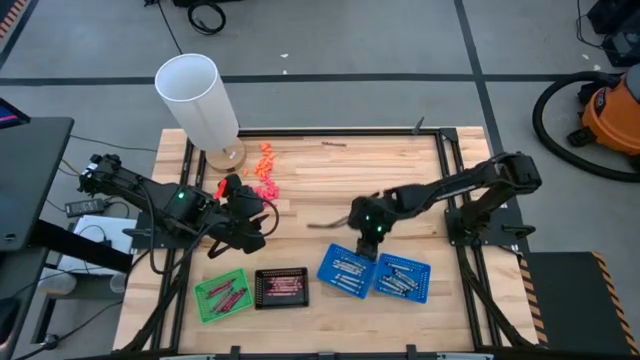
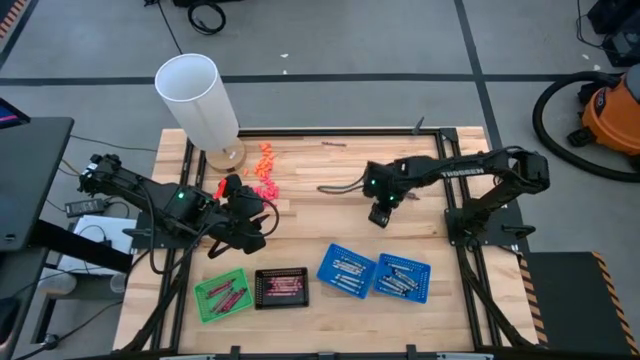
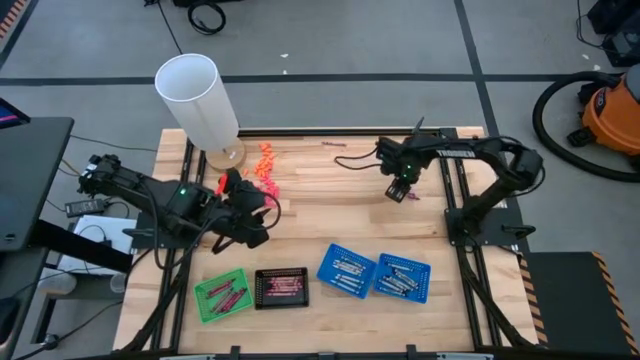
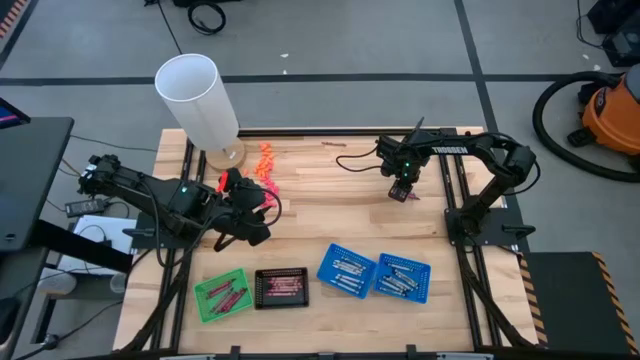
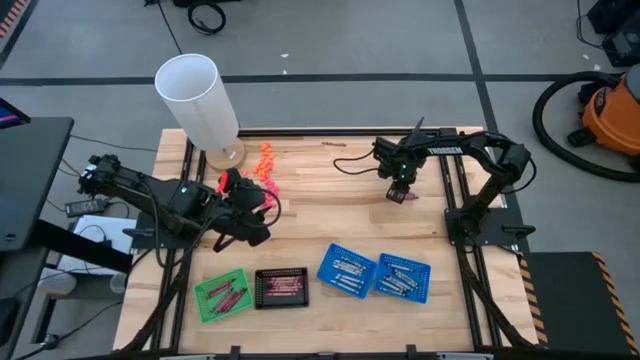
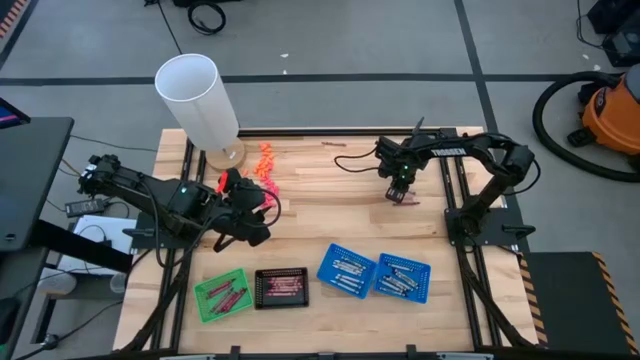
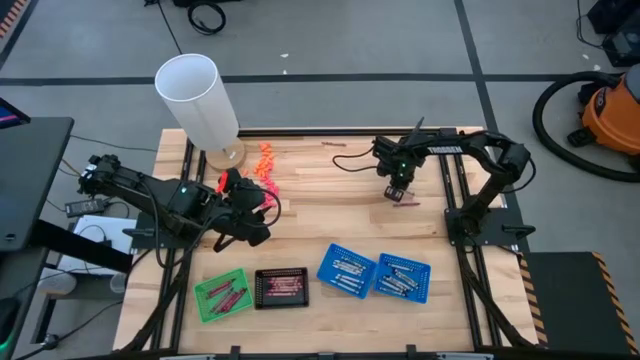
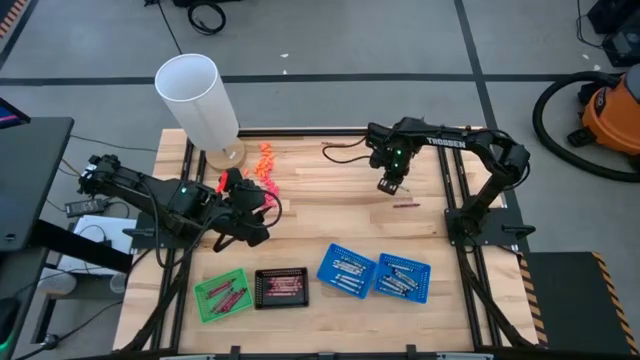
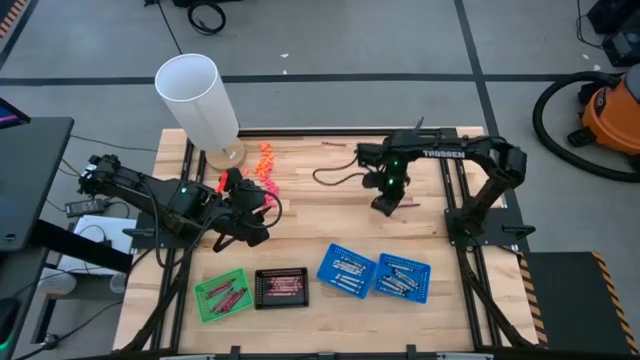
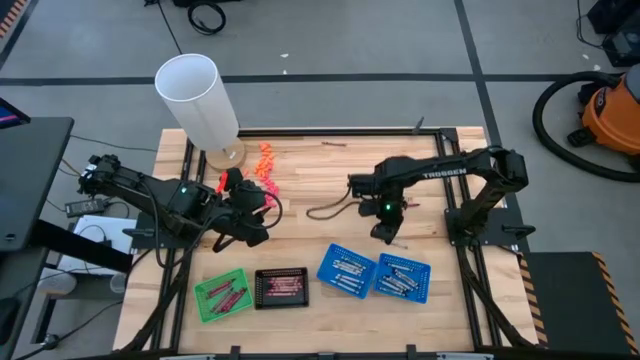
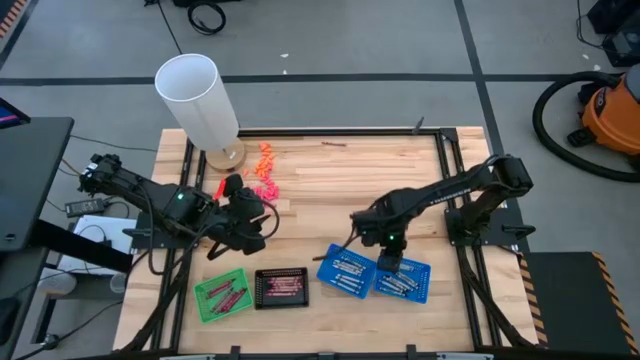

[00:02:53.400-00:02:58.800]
Task: Sort crayons
Put the black crayon into the right blue bin

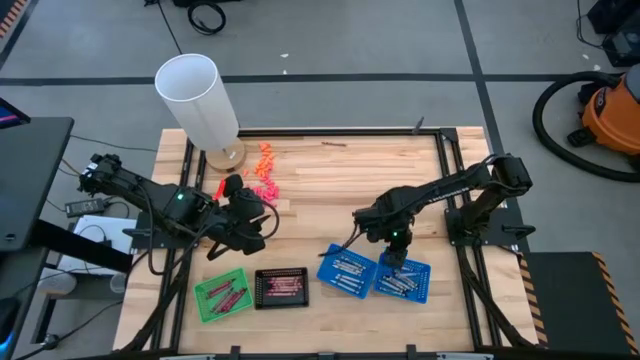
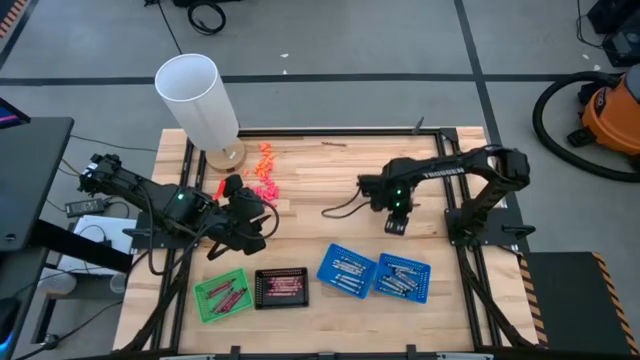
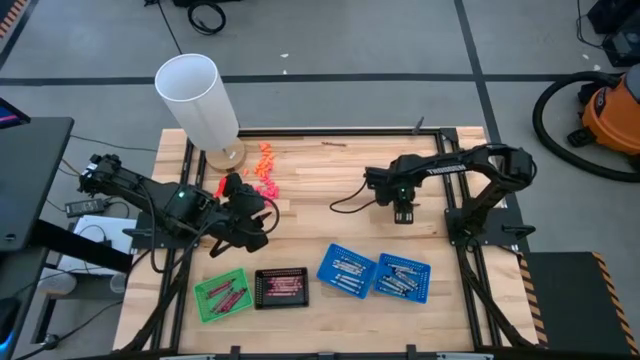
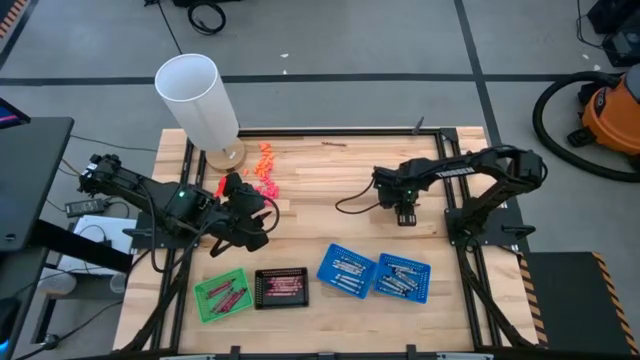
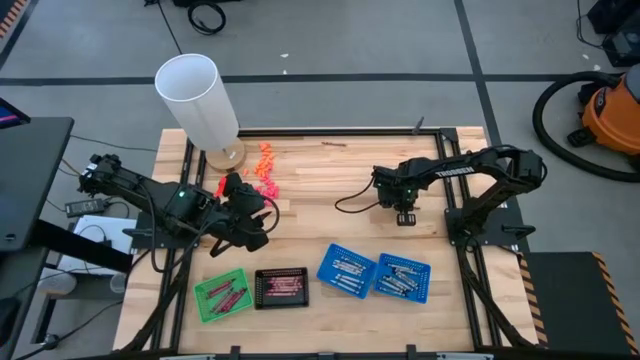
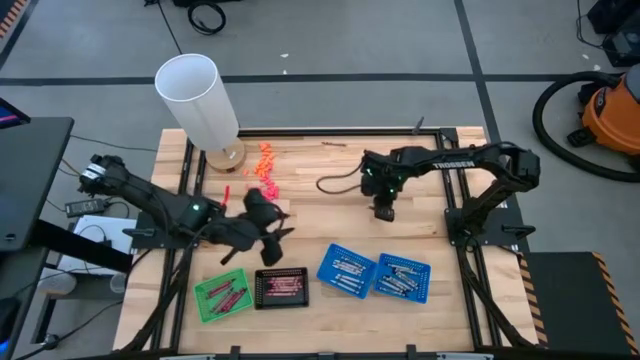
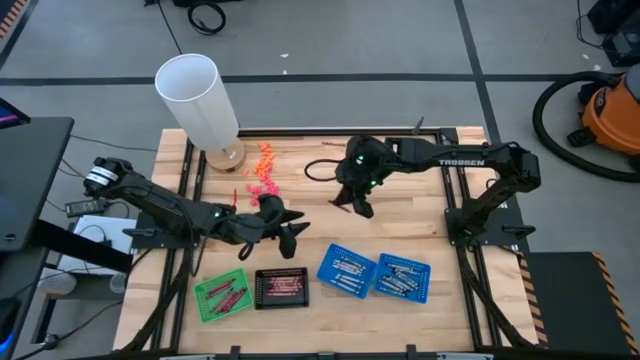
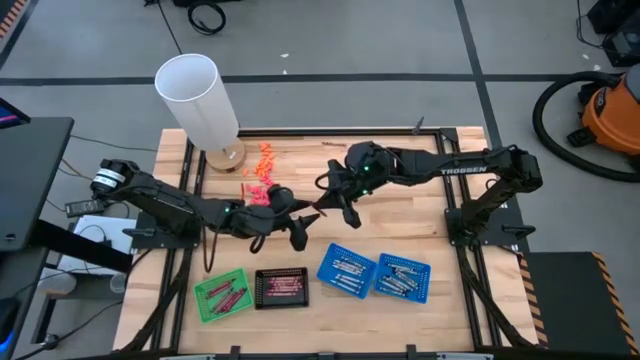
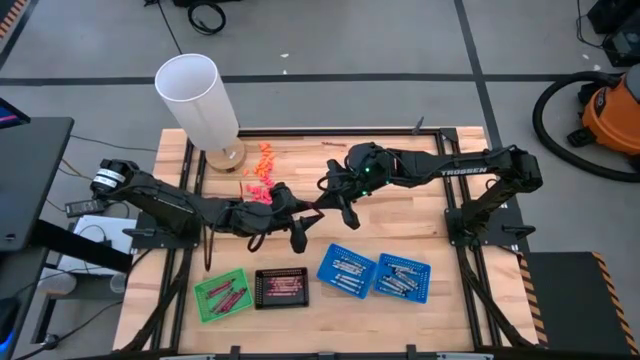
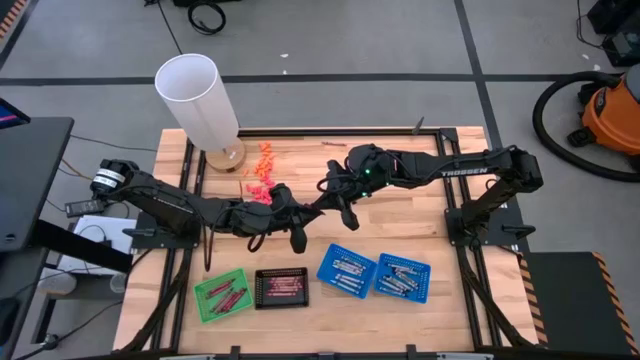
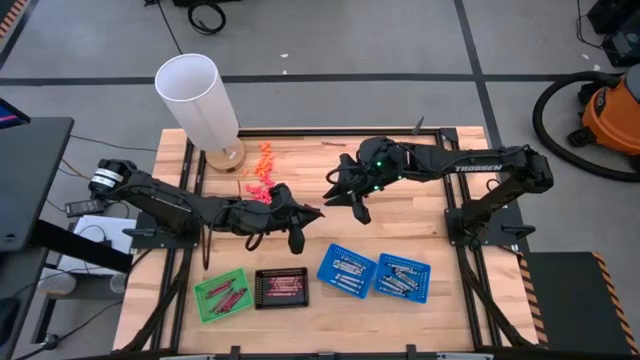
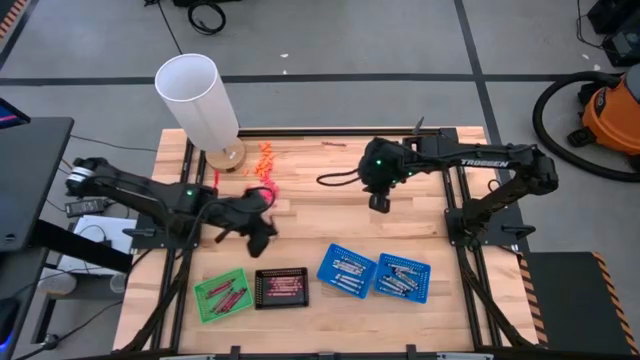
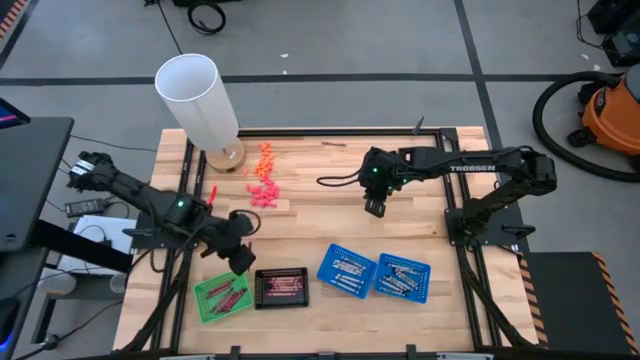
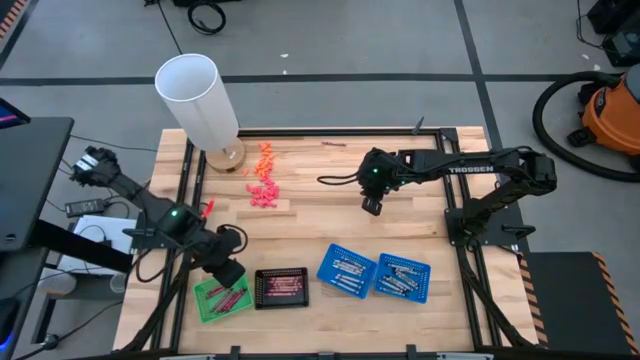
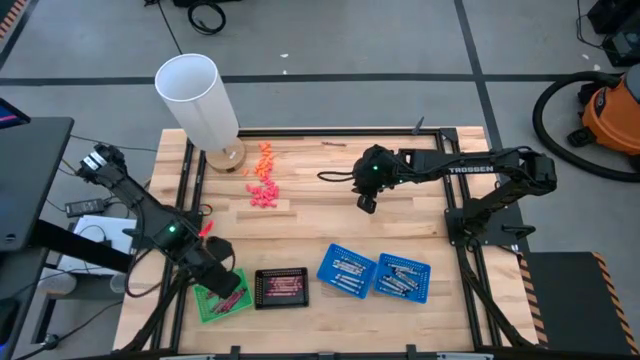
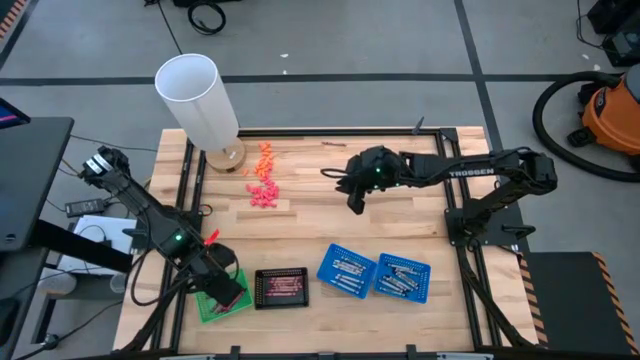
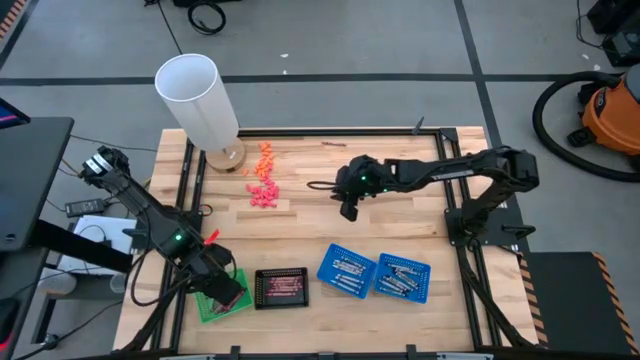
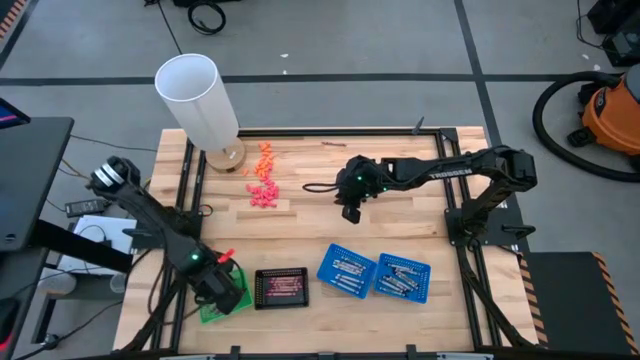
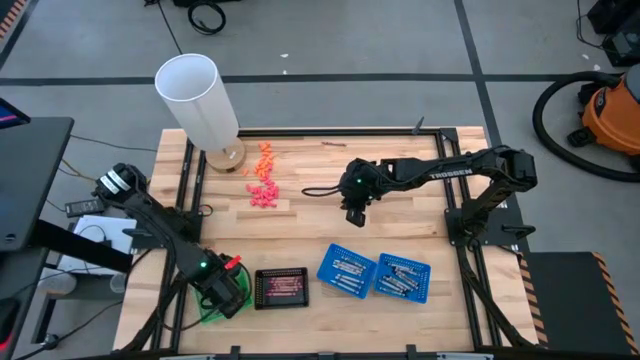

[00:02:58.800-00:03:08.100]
Put the red crayon into the green bin

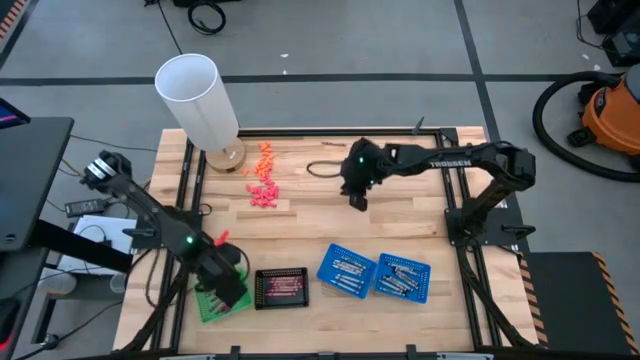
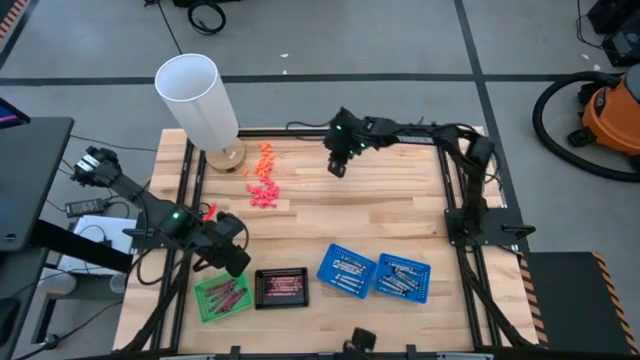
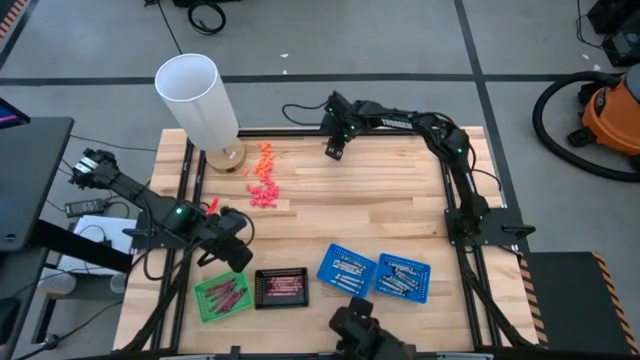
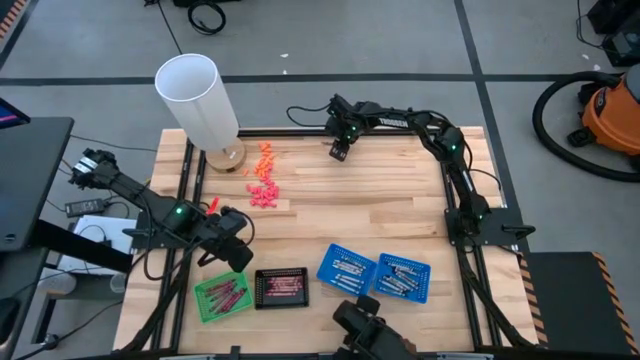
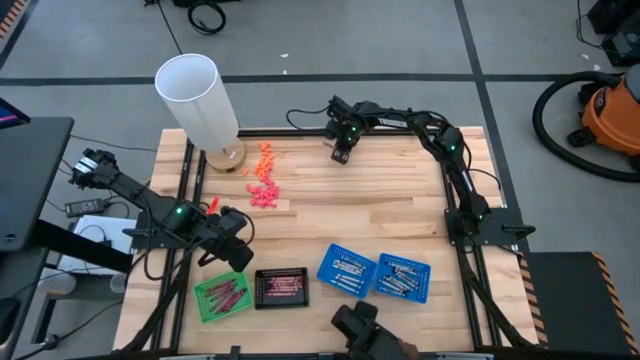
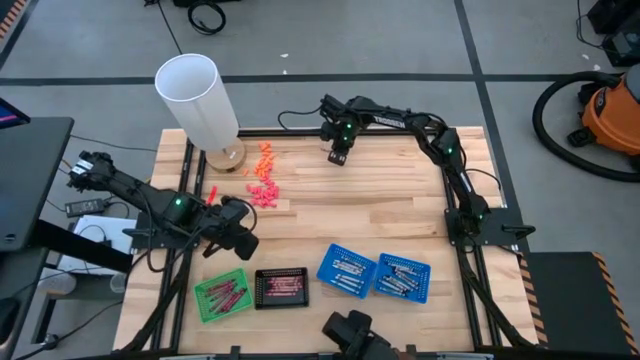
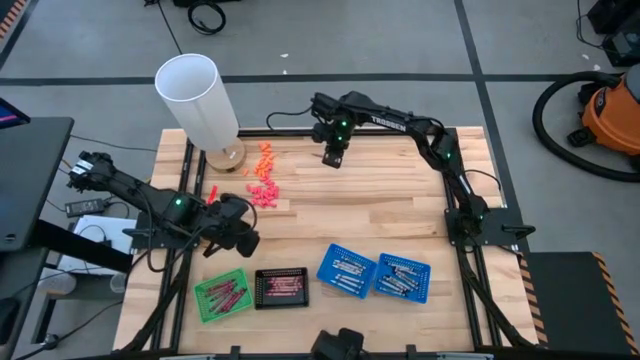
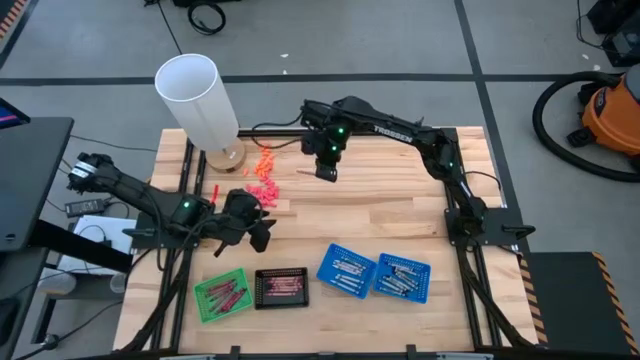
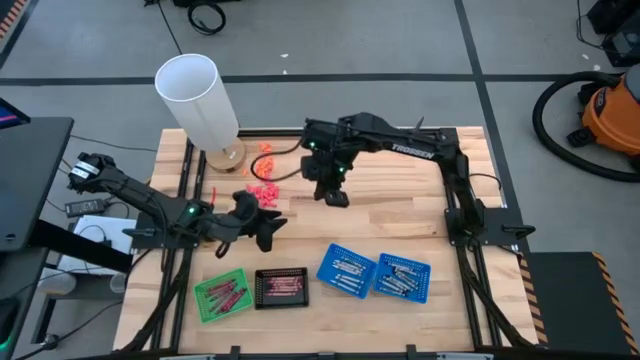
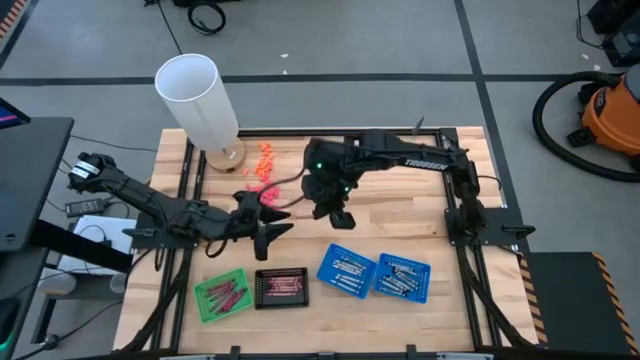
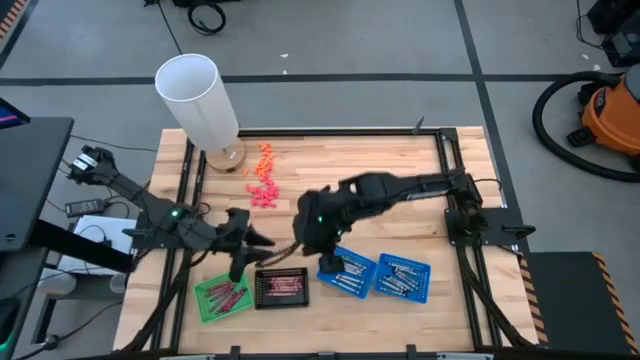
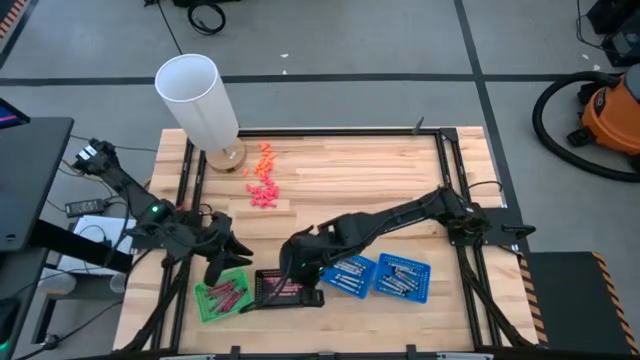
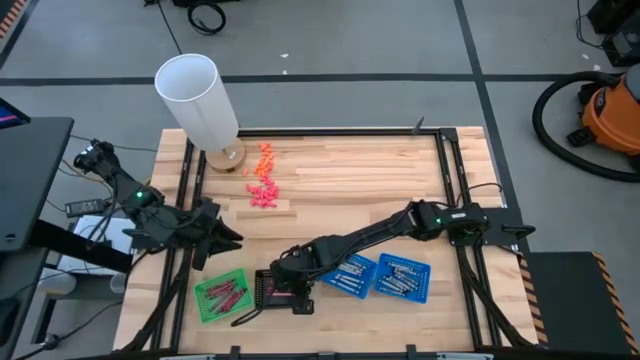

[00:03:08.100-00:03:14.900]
Put the pink crayon into the black bin
